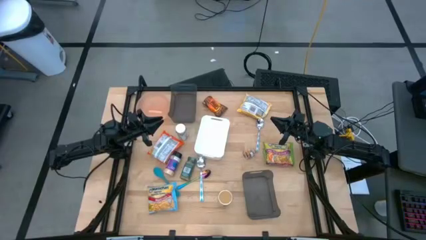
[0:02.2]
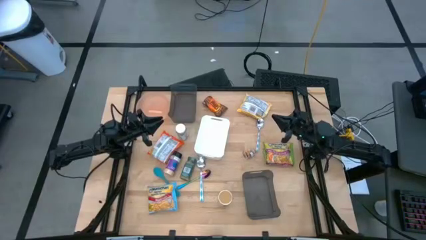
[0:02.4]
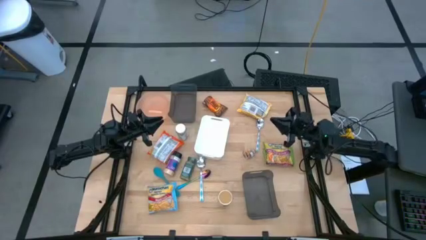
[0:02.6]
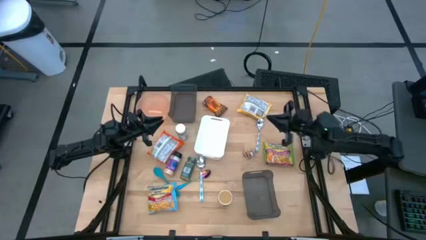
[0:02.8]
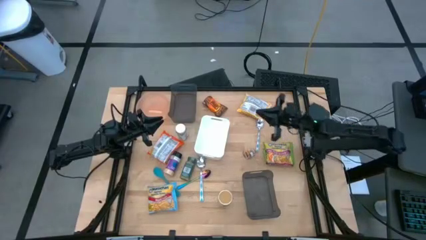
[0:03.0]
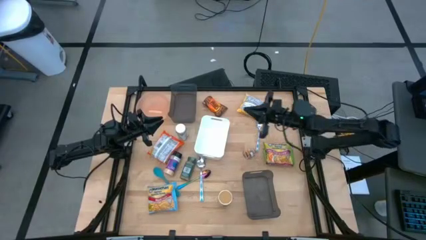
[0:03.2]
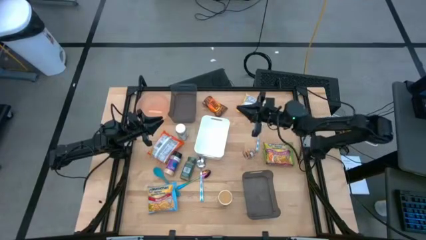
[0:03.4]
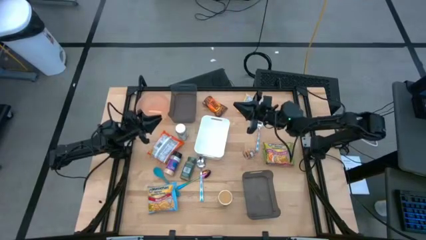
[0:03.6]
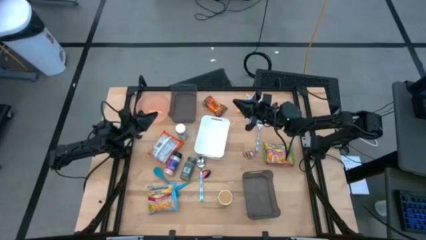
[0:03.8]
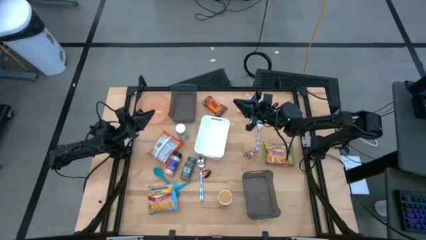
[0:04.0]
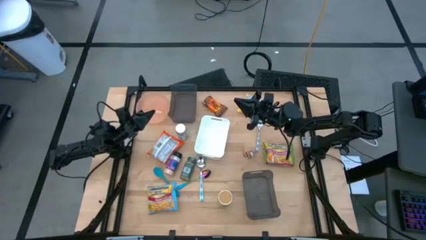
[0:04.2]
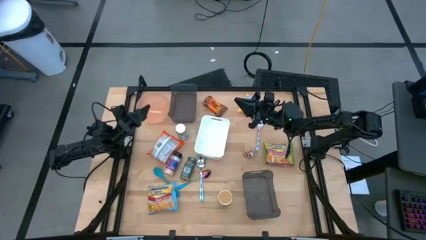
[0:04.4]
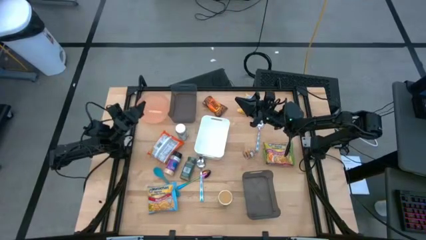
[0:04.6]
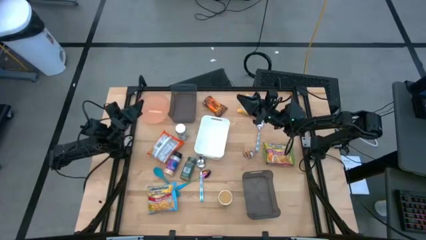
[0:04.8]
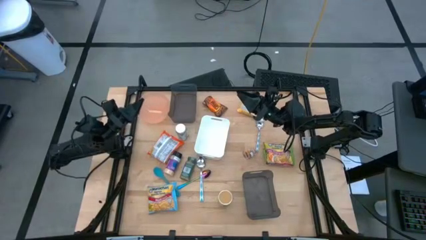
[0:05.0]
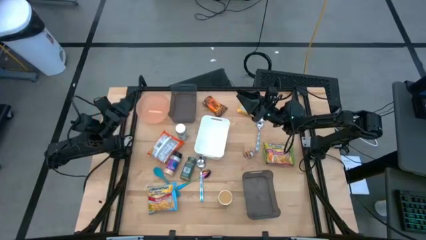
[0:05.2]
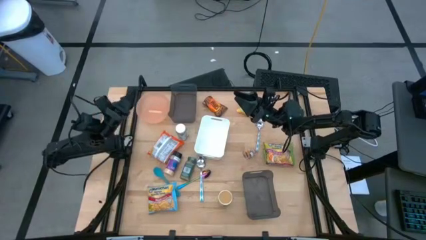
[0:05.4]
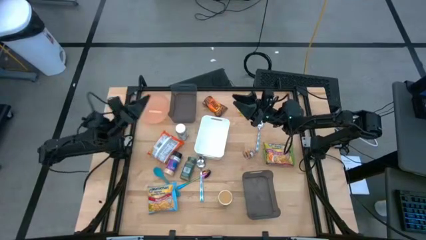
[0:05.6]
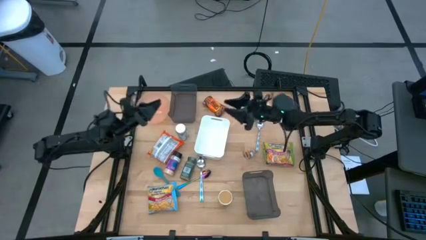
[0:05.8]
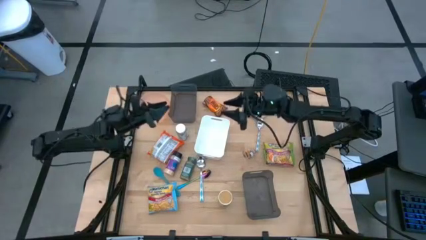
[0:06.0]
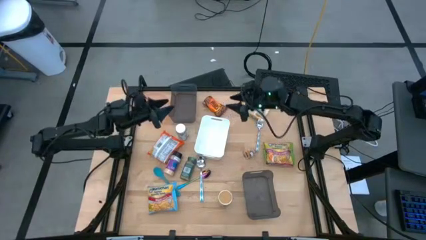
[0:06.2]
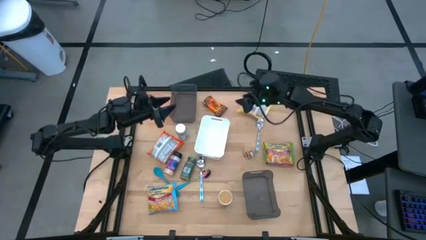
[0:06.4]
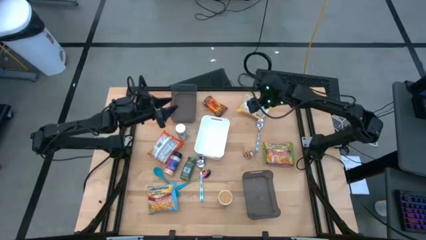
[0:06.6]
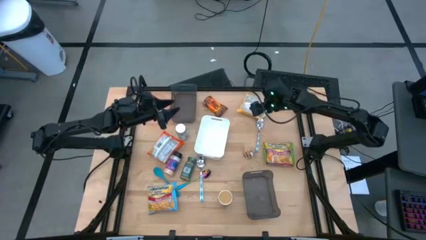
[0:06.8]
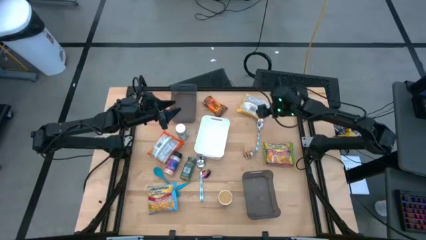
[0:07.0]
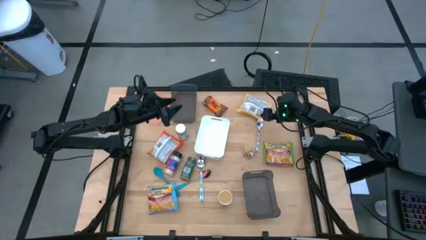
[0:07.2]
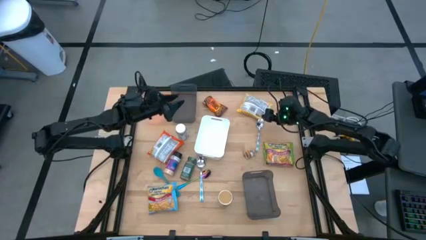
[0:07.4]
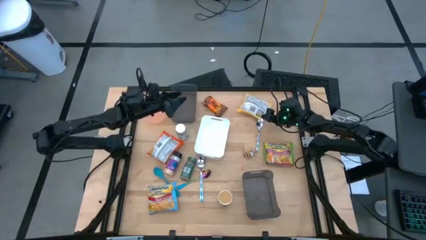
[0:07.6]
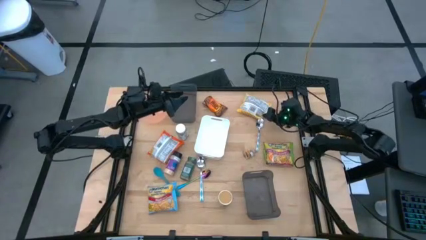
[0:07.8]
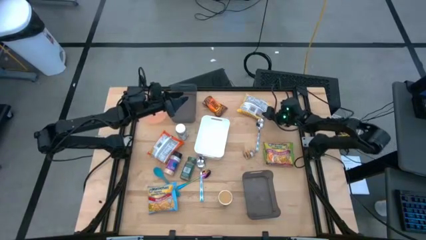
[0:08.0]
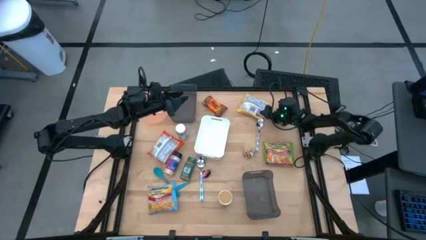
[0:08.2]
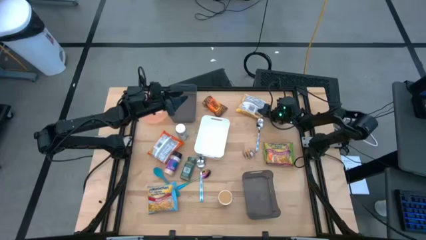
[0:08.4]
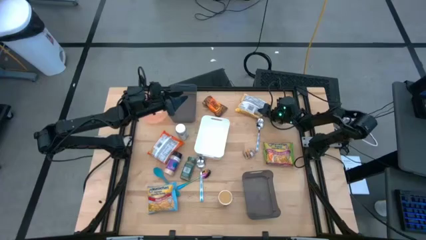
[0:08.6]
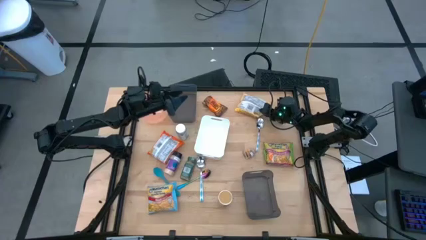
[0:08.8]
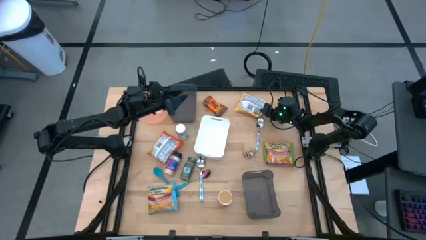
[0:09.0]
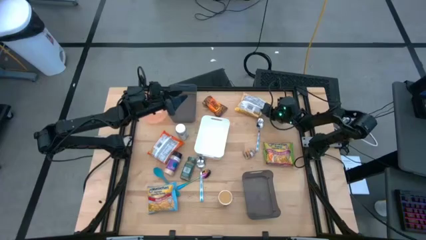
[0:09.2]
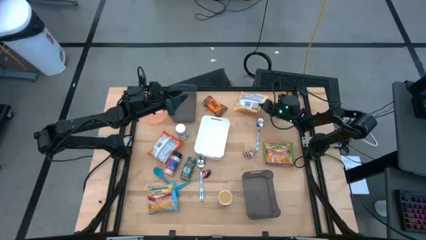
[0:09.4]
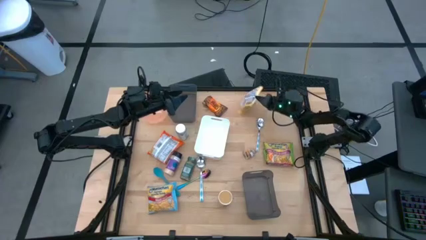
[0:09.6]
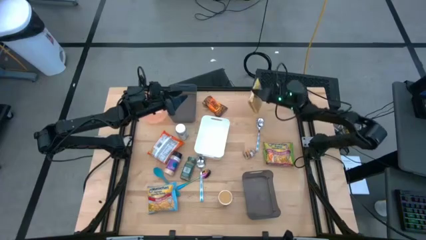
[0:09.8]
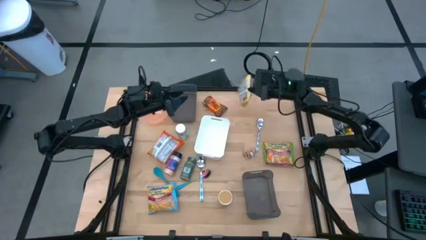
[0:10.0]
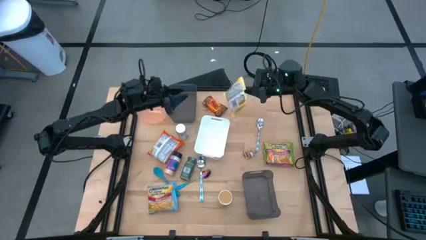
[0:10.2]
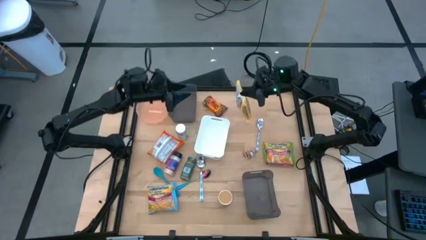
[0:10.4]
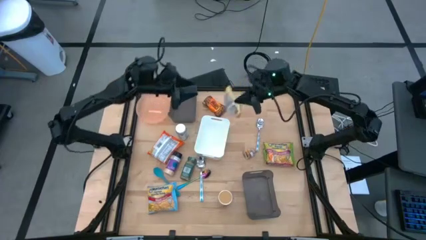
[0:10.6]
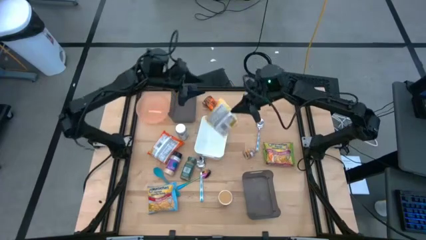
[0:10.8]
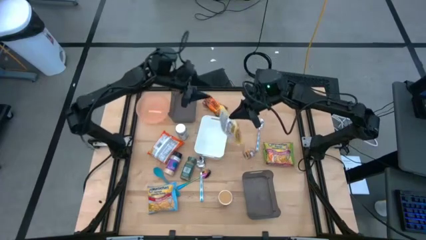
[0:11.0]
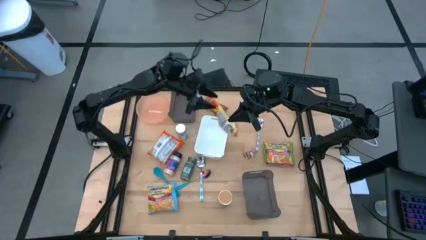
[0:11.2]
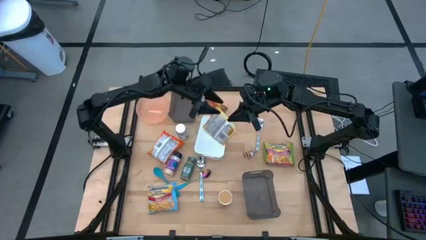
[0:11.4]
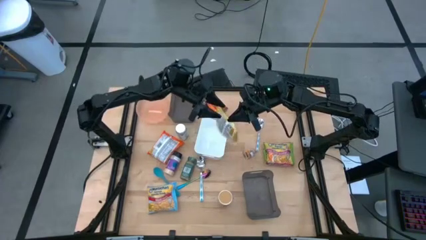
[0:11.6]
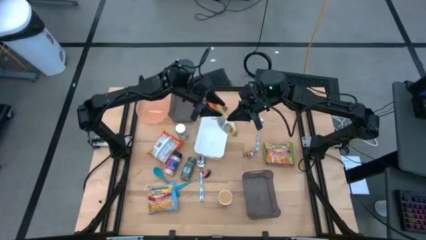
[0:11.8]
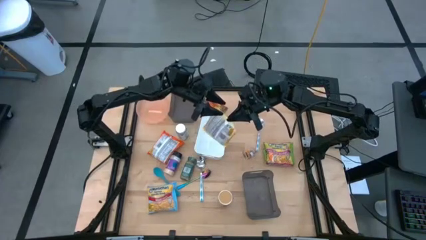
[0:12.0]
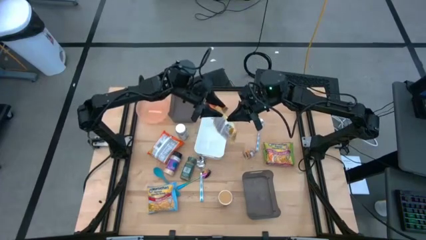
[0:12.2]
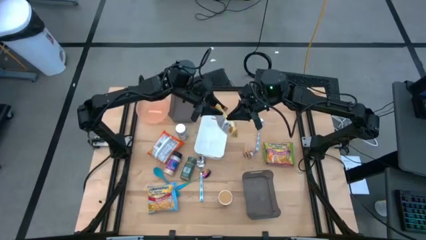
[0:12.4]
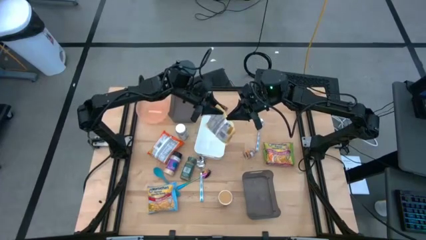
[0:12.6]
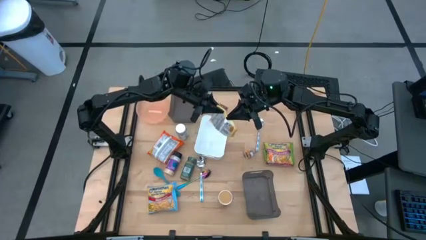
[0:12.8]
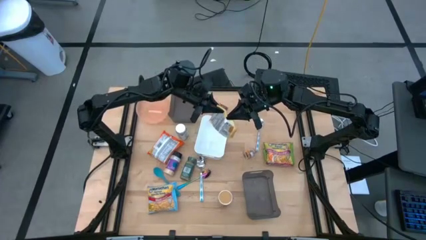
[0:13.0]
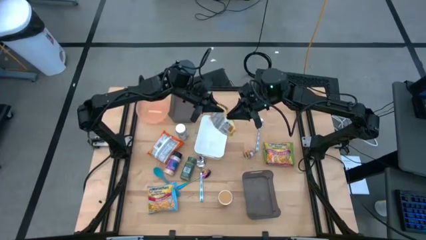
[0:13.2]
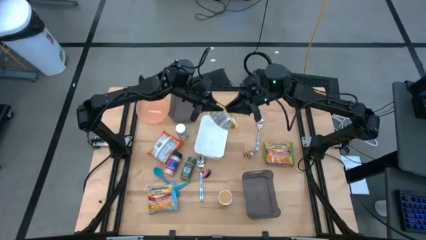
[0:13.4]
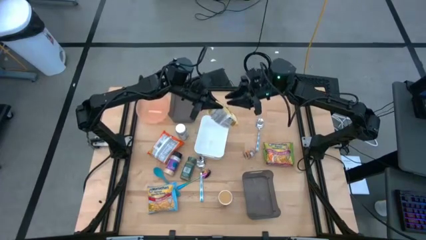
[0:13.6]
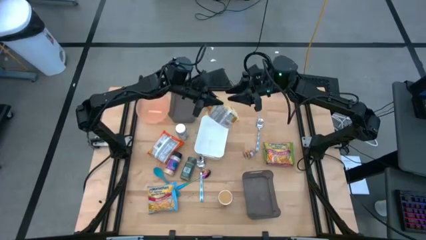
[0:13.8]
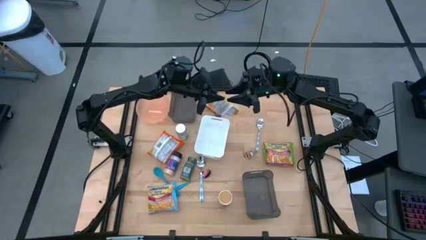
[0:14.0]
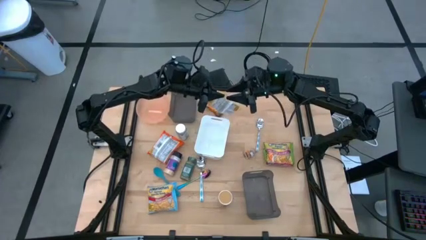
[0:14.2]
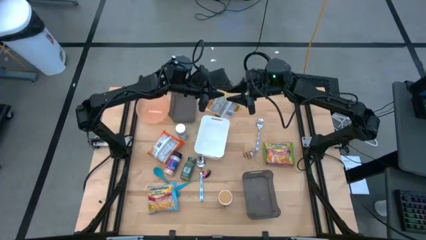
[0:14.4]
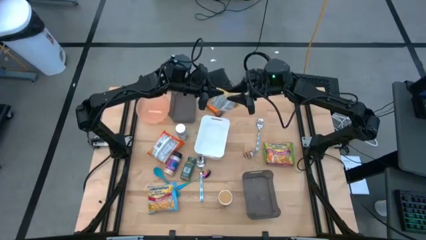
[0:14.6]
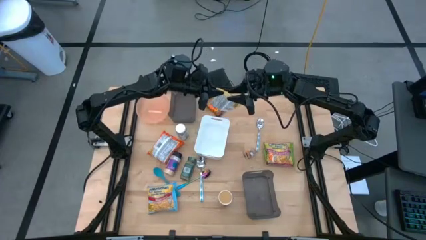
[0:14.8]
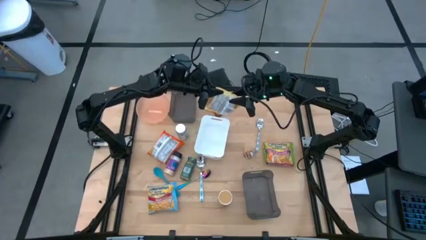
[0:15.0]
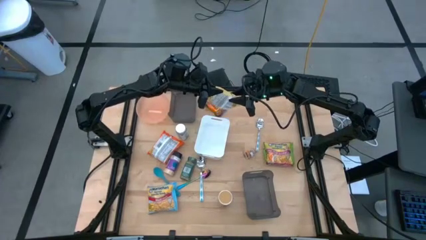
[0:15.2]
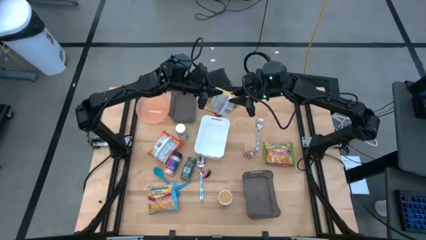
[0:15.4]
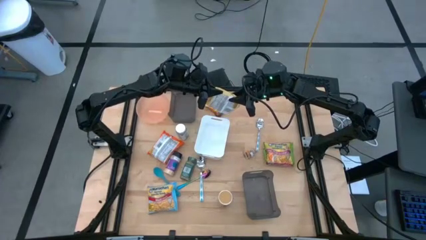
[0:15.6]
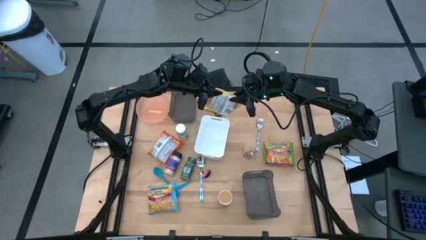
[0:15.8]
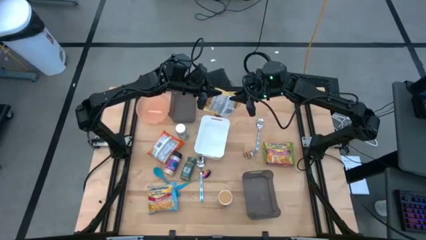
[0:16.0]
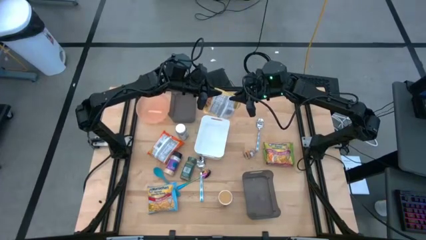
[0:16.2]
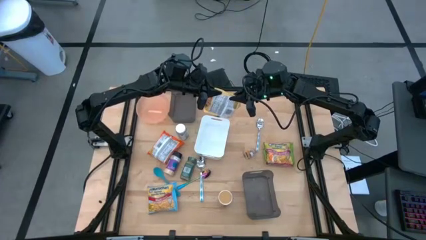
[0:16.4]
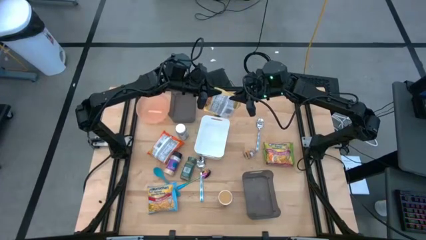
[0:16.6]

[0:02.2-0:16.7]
Task: Pick & Place Food Item
Put the yellow noodle pack into the top black bin
